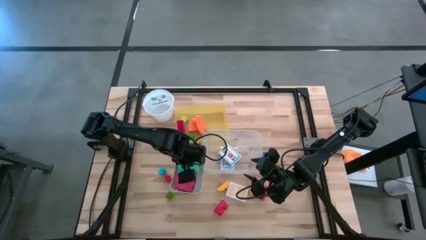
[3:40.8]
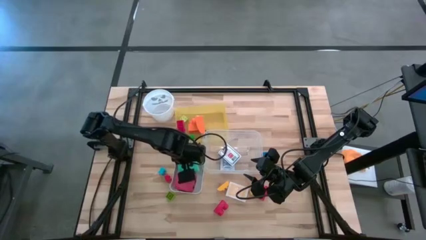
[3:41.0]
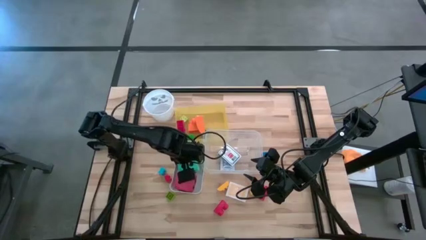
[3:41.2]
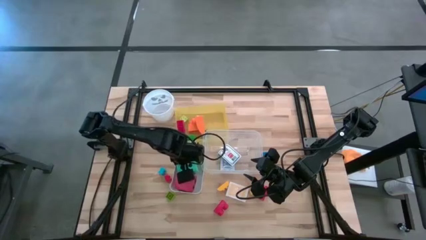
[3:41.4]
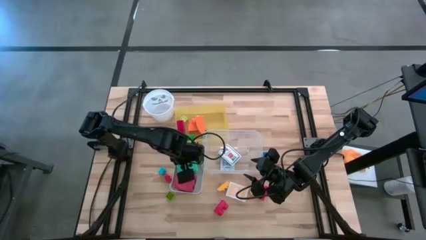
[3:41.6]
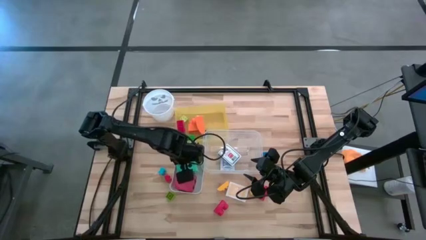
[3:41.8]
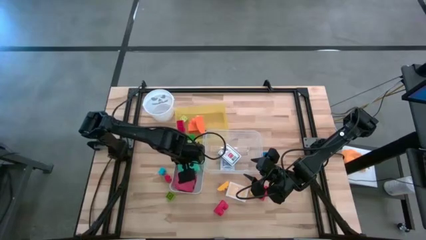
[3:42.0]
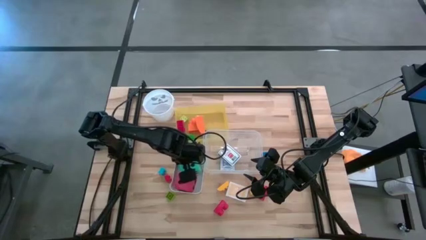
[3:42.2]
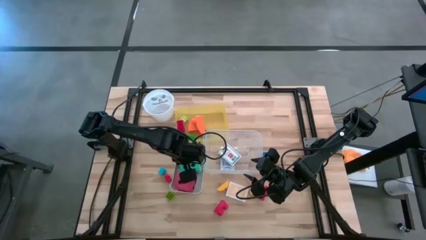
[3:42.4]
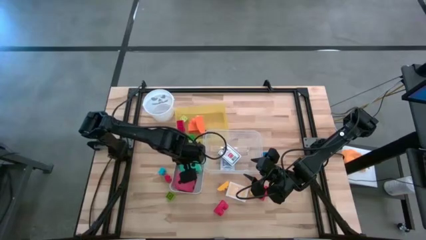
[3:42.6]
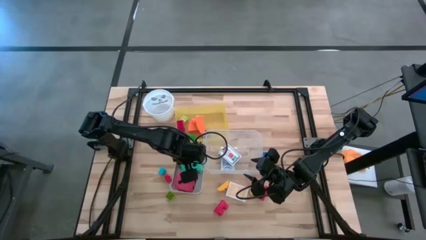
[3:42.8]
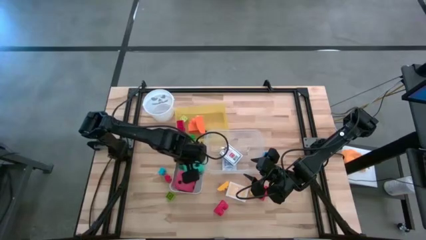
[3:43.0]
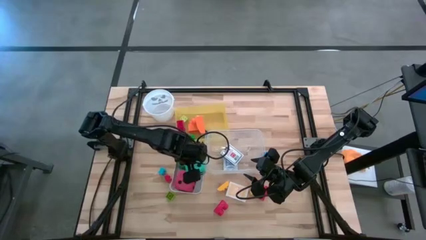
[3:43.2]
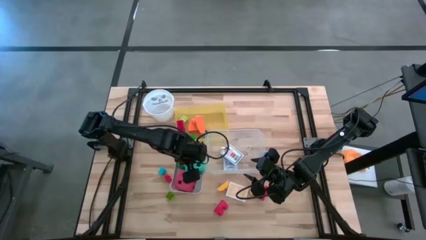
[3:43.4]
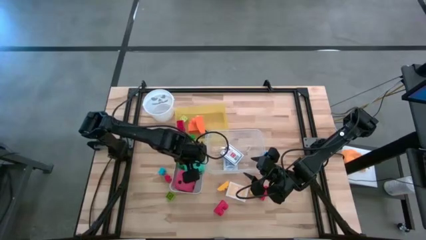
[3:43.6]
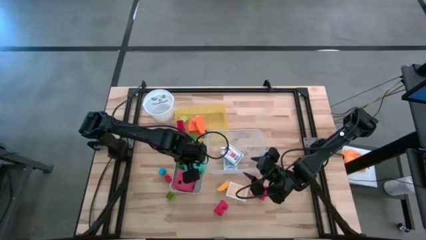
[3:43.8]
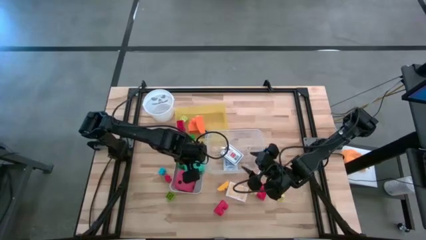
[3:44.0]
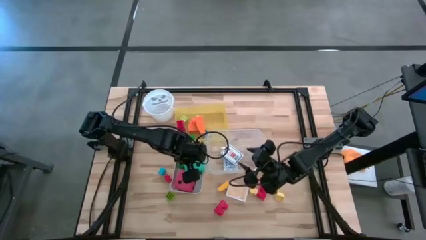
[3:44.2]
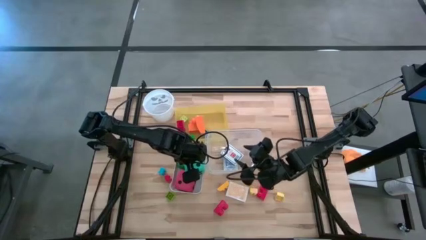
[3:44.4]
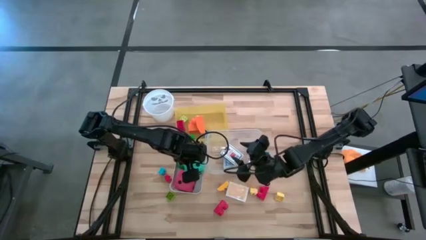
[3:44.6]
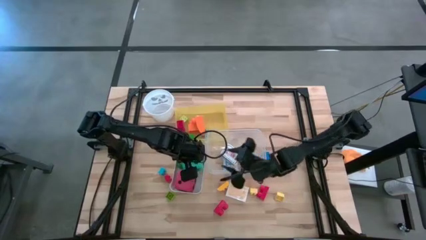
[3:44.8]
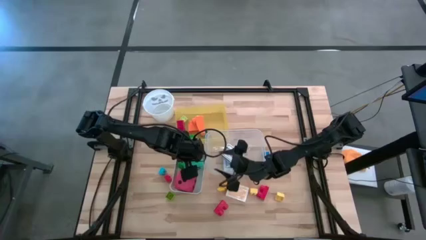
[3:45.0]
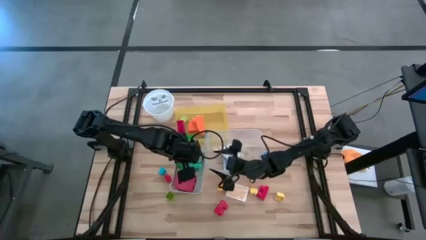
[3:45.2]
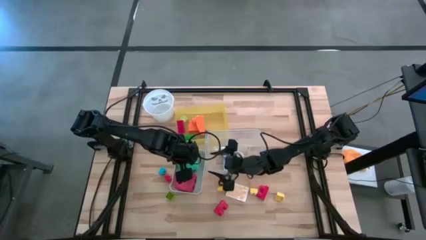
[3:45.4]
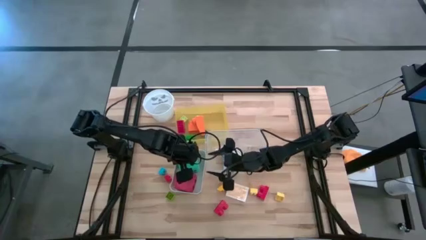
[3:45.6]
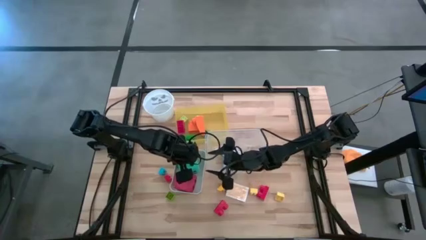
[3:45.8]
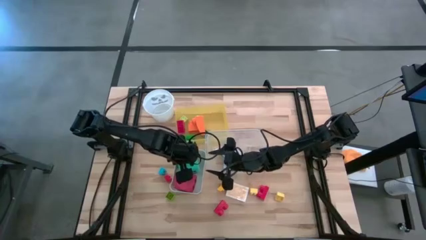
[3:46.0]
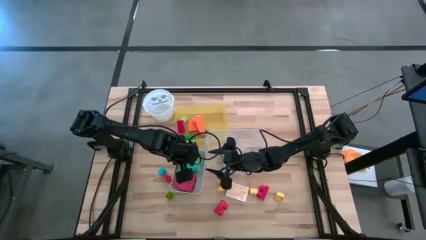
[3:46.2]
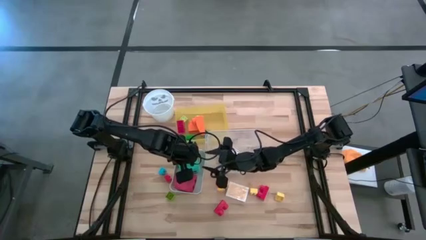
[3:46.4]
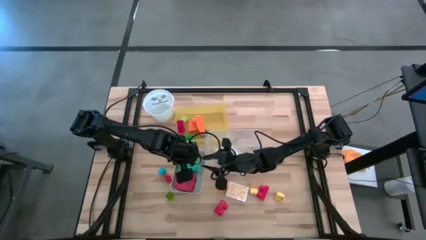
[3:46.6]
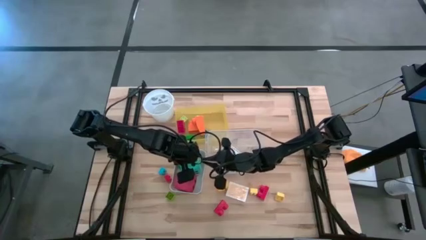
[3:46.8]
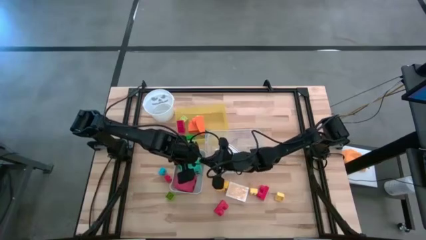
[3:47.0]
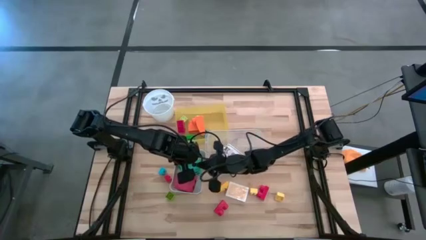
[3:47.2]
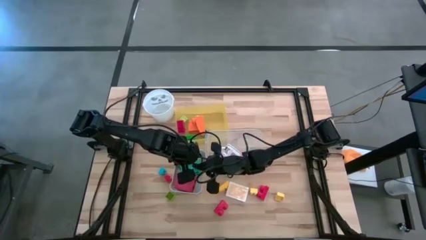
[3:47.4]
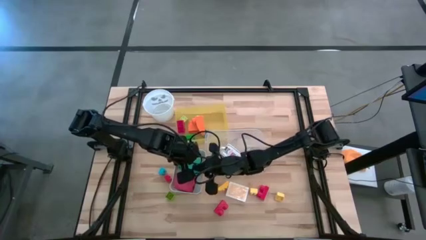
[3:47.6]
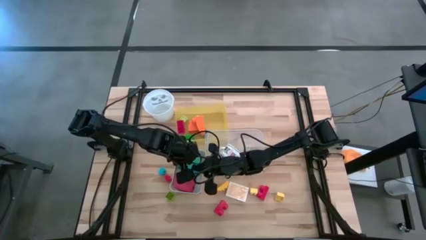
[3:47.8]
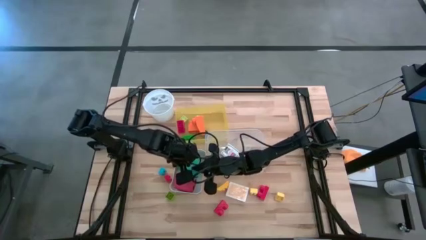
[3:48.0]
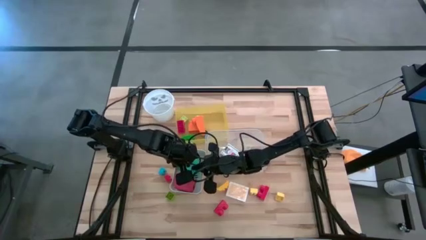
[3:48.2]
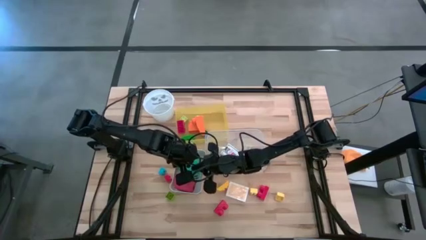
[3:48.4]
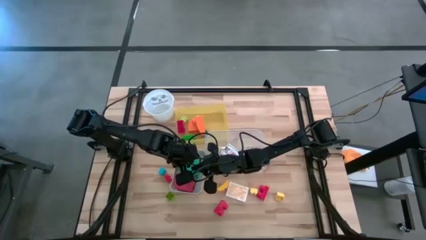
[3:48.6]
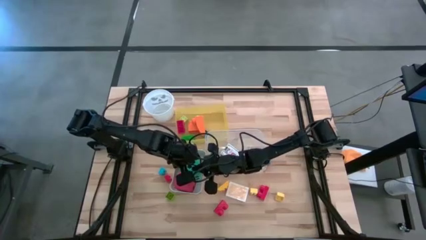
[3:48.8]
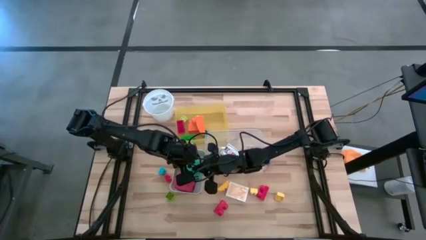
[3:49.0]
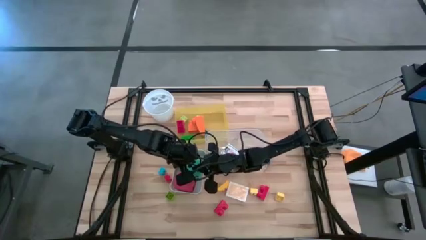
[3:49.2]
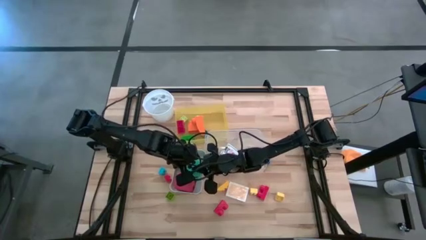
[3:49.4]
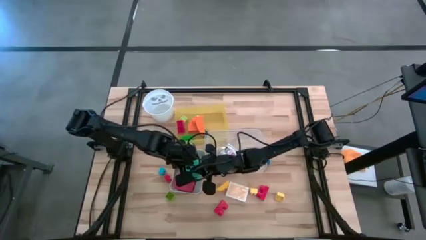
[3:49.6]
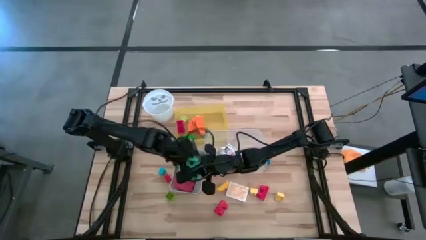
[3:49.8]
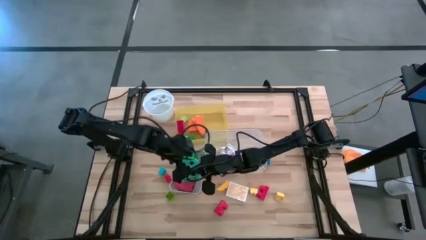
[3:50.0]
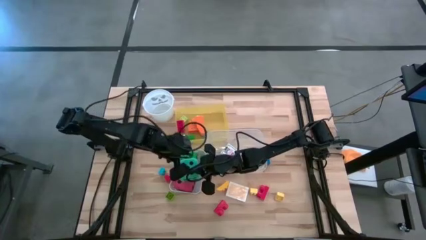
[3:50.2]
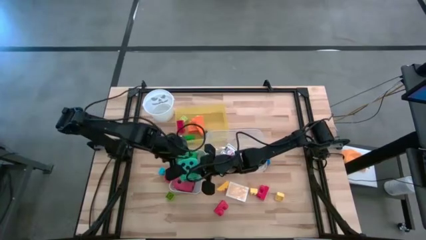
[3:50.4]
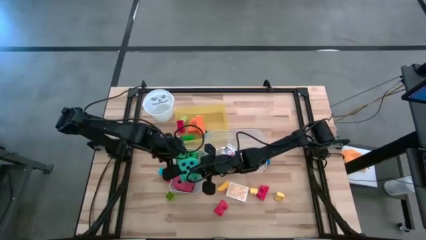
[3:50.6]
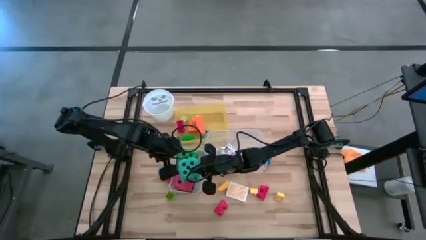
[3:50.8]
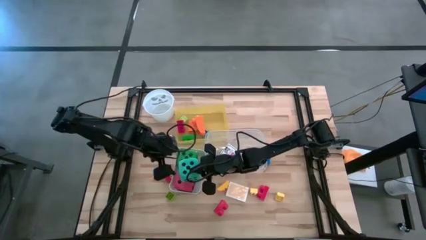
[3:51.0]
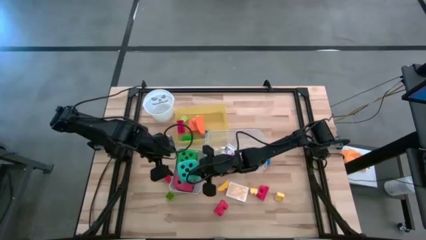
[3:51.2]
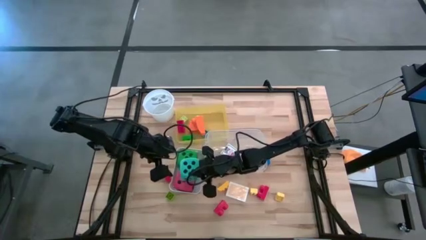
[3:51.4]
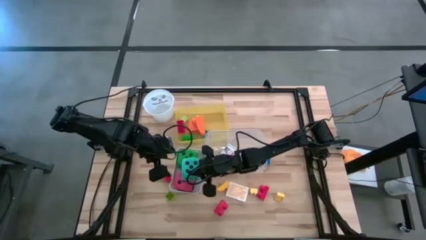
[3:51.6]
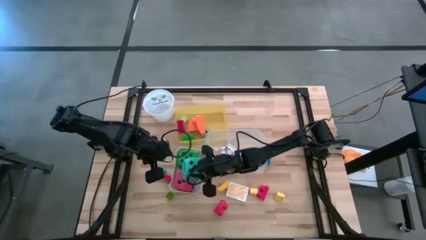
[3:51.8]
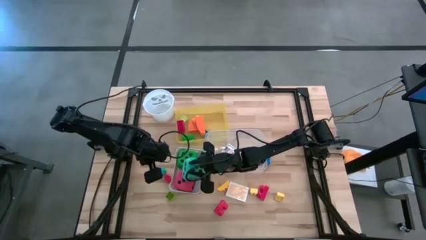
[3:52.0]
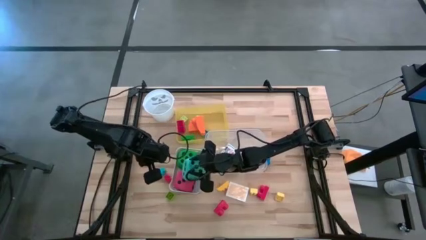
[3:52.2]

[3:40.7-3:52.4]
Task: Pick & Place Toys
Put the blue dice into the white bin

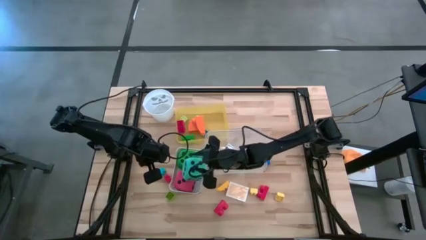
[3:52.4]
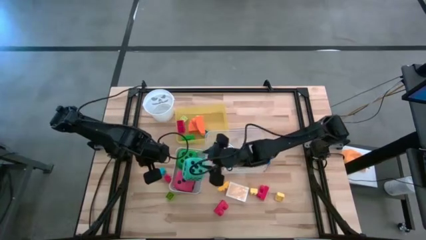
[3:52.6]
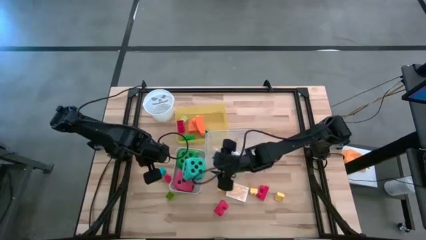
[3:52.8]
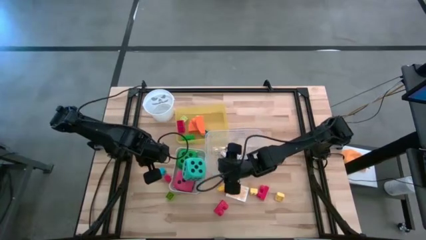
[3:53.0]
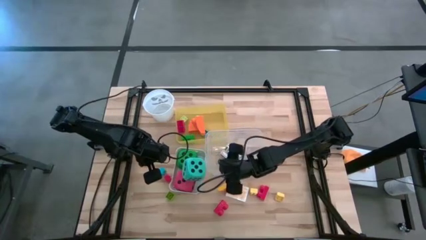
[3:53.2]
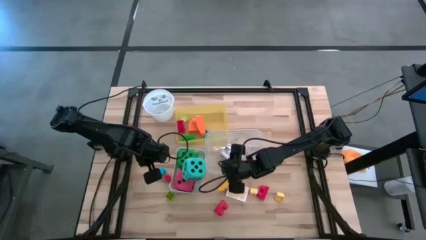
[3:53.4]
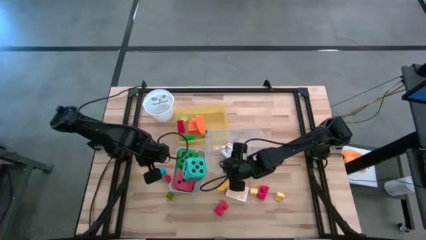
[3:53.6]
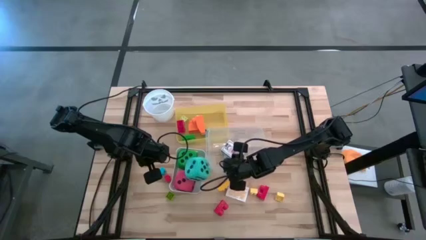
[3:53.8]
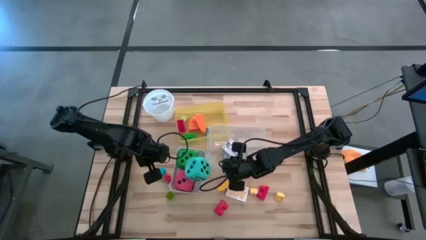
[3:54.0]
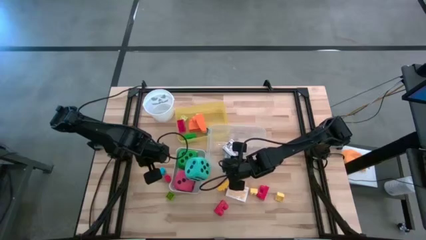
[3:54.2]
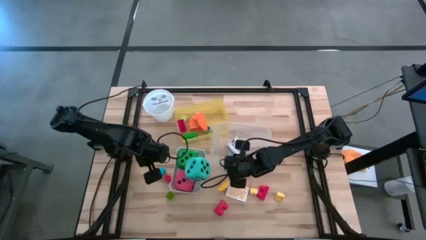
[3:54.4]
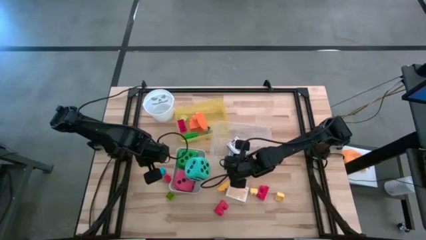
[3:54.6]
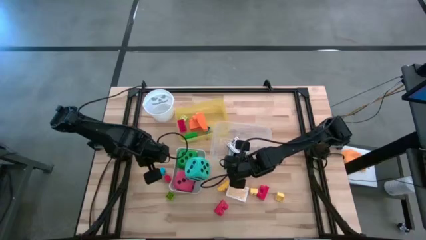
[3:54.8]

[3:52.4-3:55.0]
Adjust the transparent bin

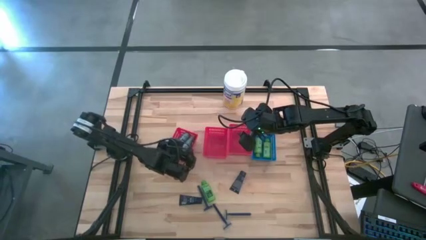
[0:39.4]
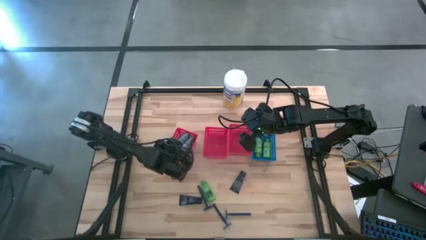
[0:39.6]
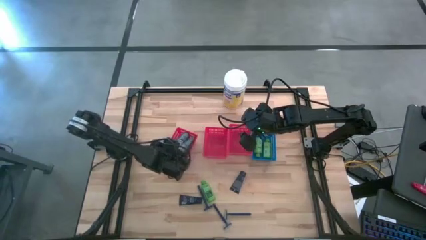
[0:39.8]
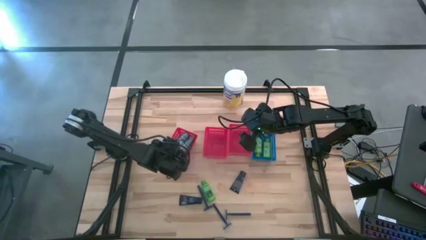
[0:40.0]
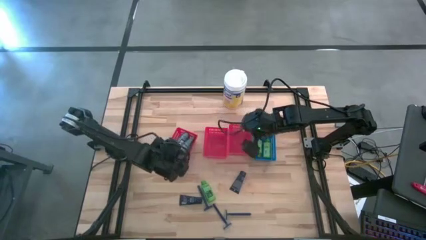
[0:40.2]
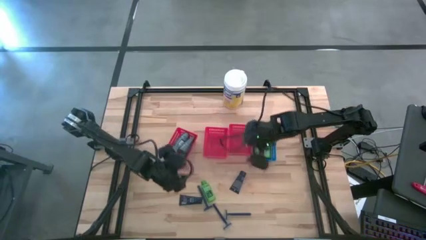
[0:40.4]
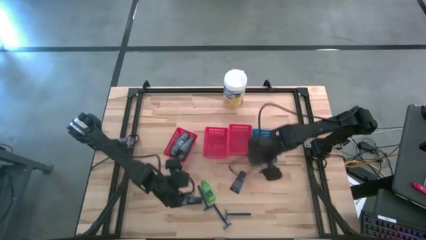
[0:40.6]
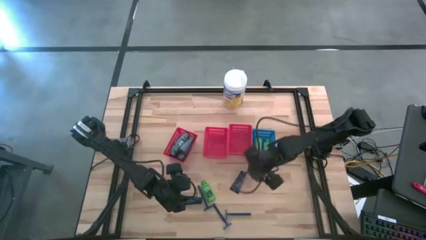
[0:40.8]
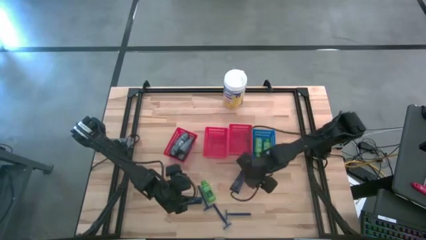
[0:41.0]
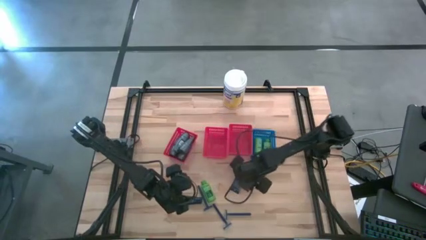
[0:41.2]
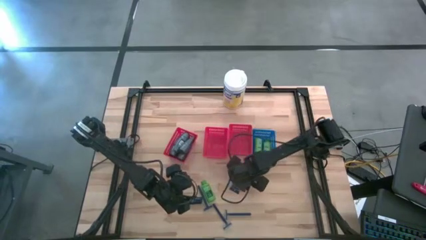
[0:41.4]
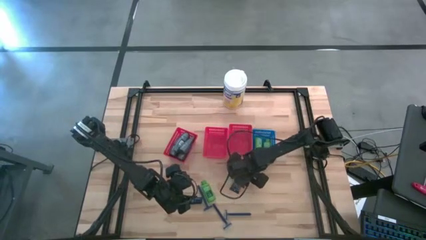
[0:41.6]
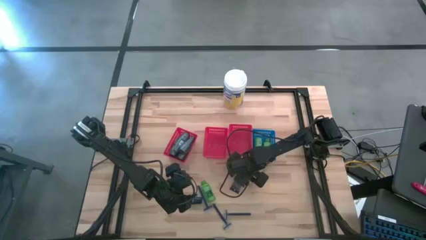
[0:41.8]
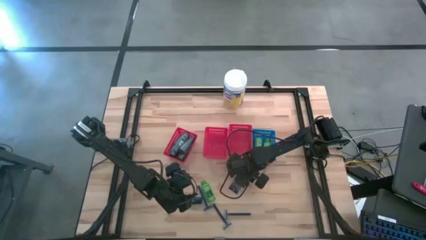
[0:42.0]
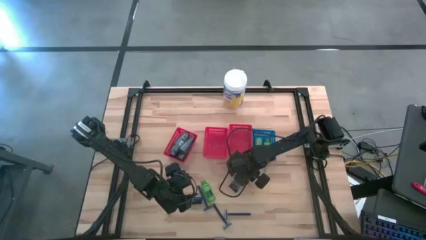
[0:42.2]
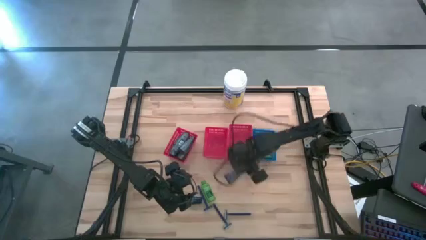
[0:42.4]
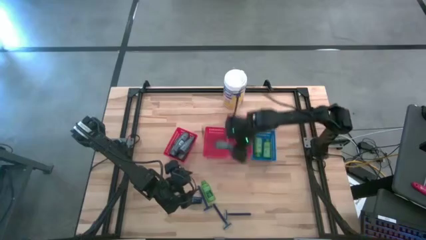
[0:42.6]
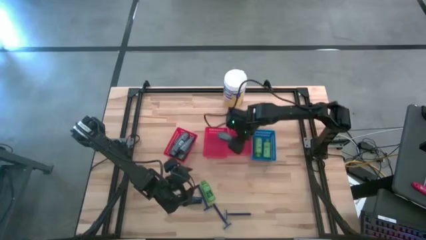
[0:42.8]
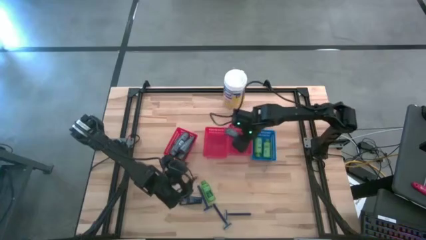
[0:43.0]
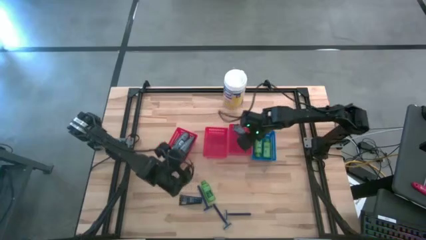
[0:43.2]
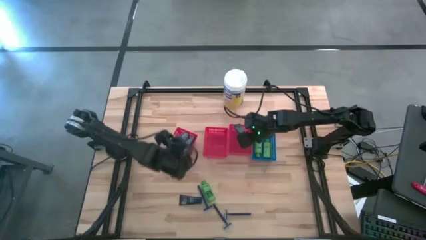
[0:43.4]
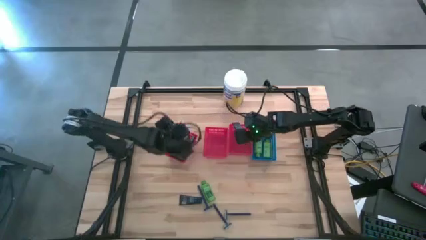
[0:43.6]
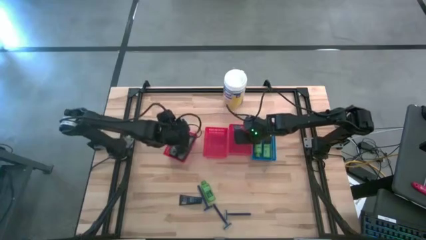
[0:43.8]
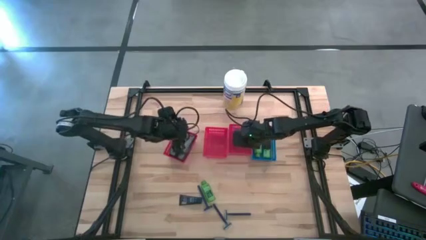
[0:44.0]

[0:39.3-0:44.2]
Task: Pick & Place Travel size toiletries
Put the blue shave cream into the right red bin
